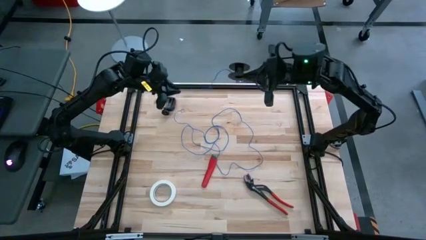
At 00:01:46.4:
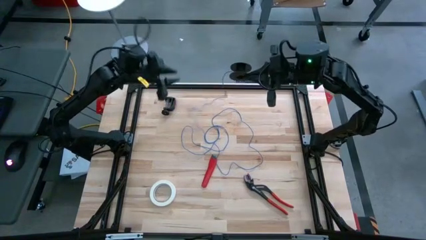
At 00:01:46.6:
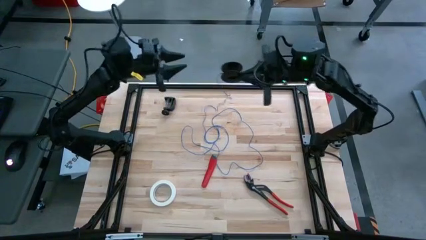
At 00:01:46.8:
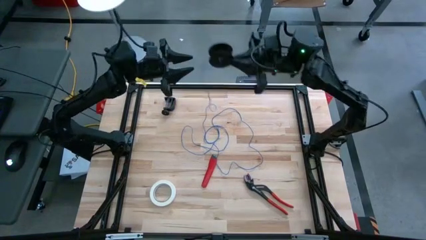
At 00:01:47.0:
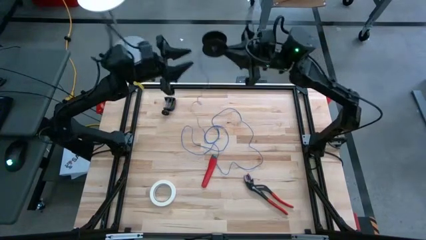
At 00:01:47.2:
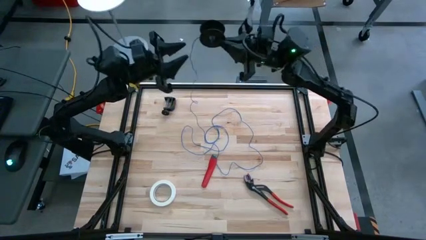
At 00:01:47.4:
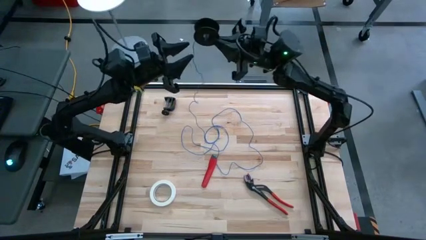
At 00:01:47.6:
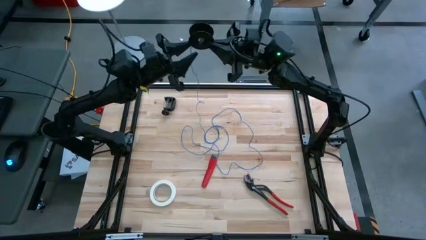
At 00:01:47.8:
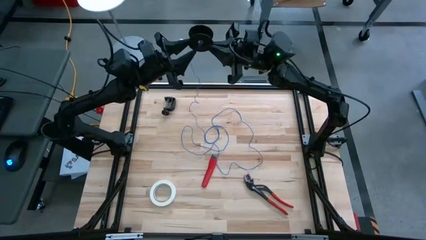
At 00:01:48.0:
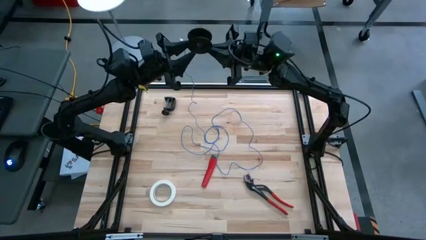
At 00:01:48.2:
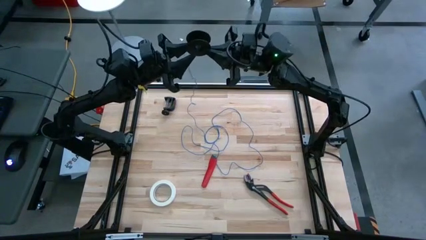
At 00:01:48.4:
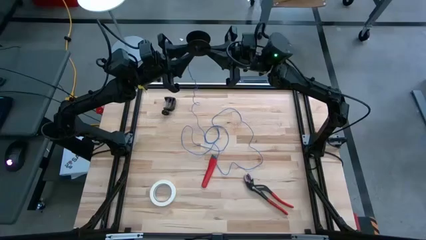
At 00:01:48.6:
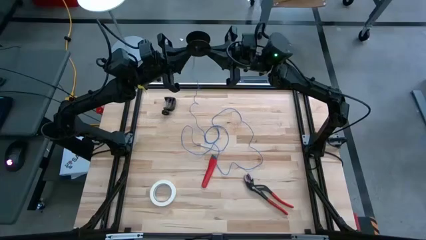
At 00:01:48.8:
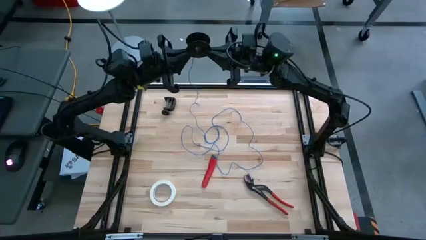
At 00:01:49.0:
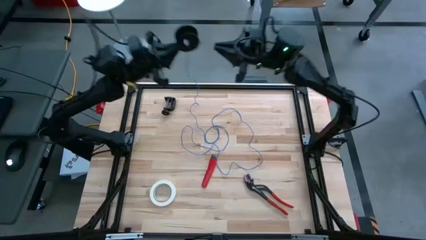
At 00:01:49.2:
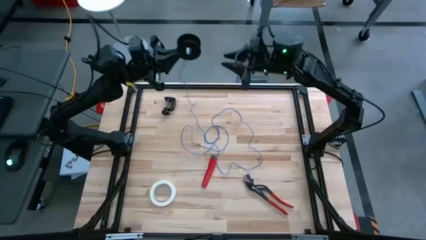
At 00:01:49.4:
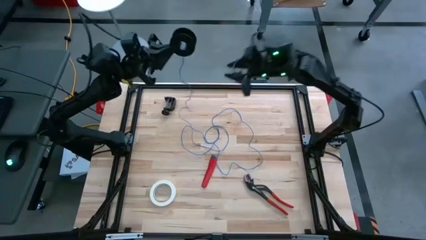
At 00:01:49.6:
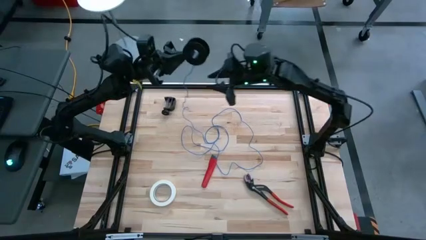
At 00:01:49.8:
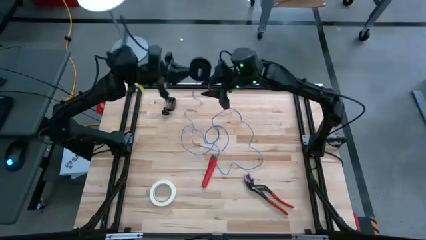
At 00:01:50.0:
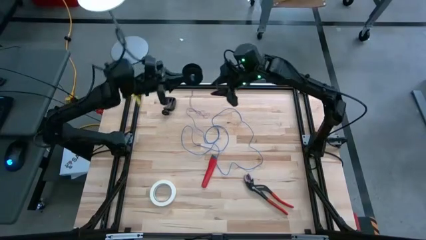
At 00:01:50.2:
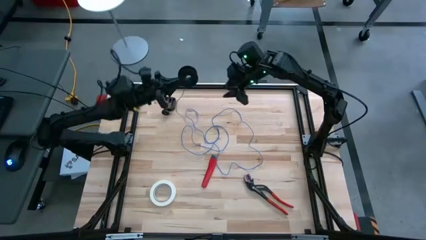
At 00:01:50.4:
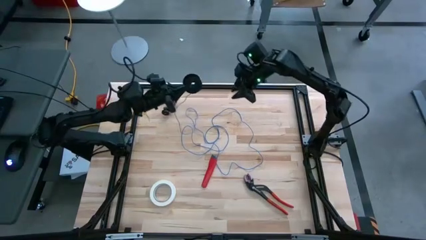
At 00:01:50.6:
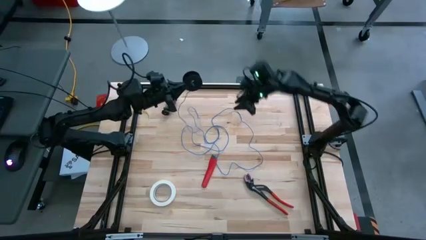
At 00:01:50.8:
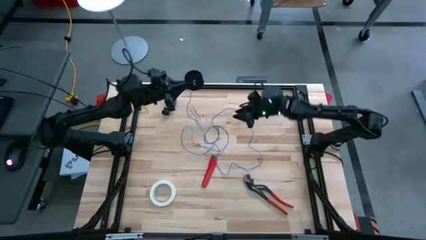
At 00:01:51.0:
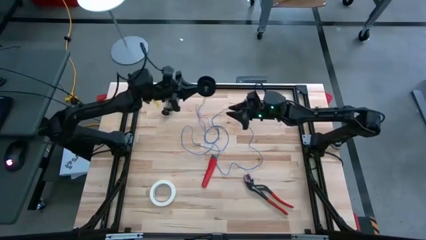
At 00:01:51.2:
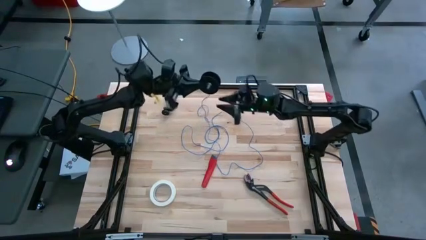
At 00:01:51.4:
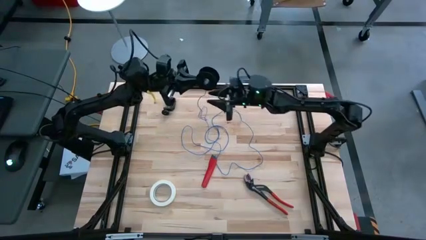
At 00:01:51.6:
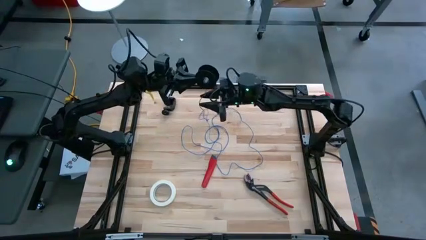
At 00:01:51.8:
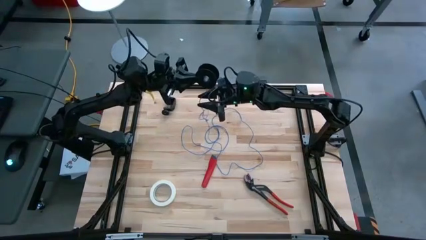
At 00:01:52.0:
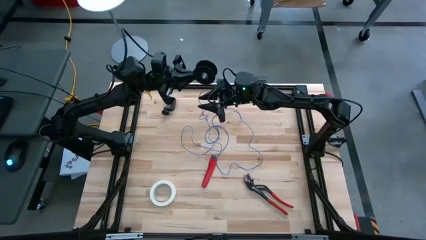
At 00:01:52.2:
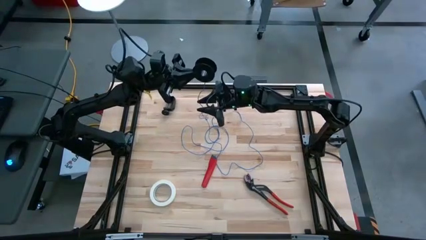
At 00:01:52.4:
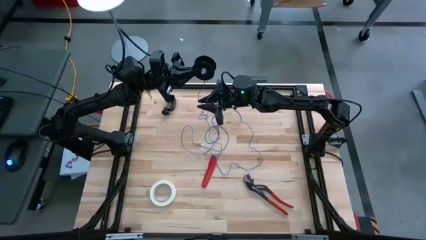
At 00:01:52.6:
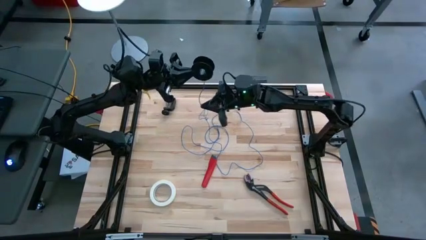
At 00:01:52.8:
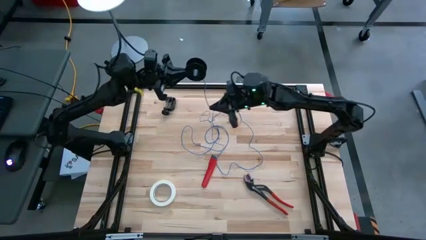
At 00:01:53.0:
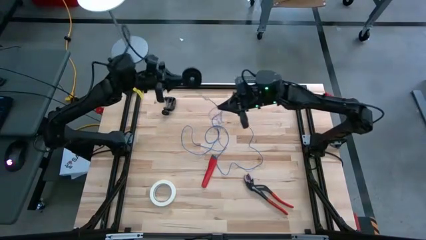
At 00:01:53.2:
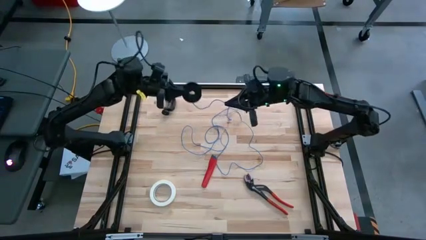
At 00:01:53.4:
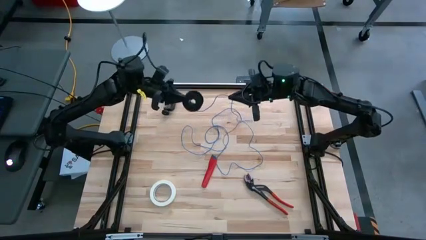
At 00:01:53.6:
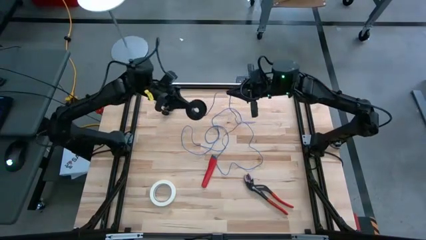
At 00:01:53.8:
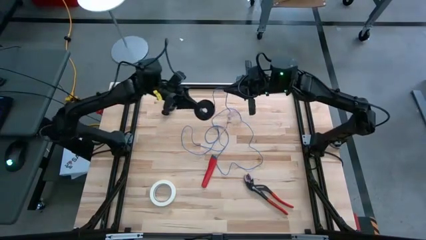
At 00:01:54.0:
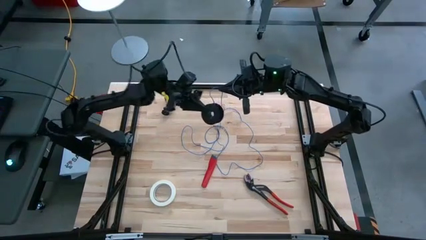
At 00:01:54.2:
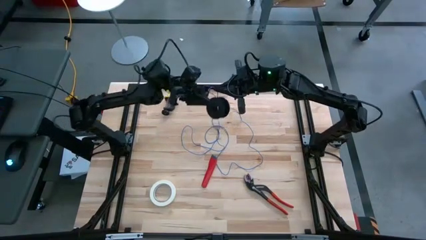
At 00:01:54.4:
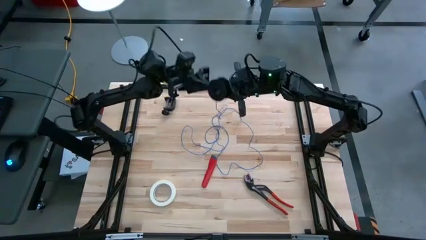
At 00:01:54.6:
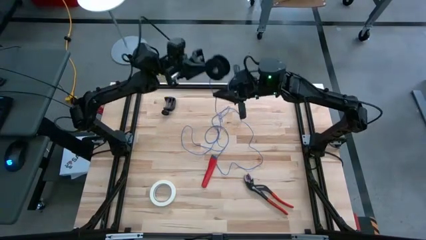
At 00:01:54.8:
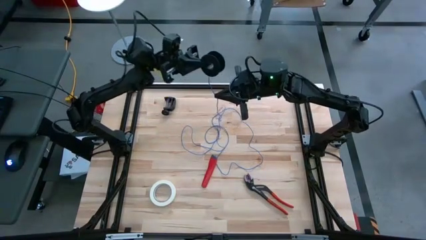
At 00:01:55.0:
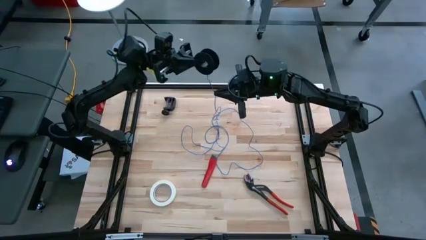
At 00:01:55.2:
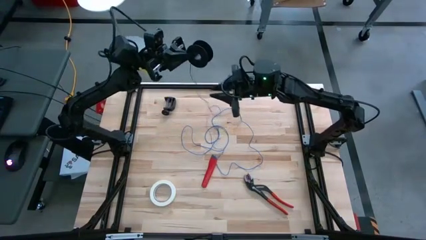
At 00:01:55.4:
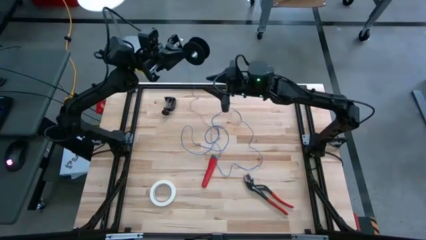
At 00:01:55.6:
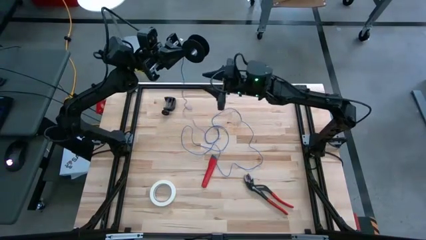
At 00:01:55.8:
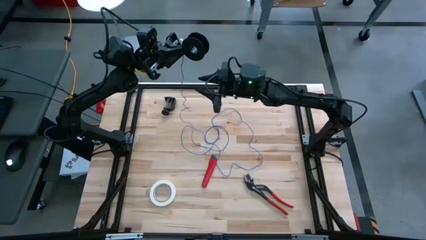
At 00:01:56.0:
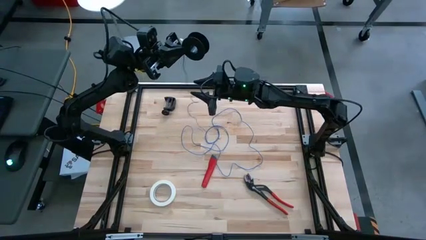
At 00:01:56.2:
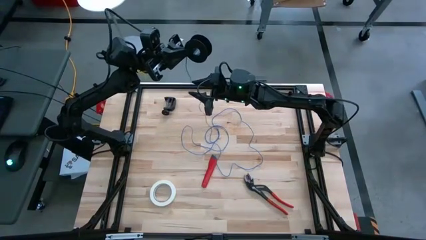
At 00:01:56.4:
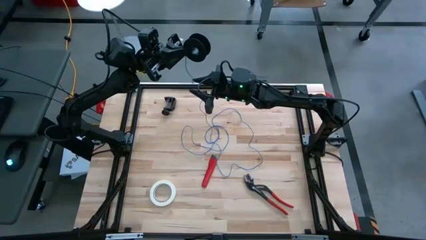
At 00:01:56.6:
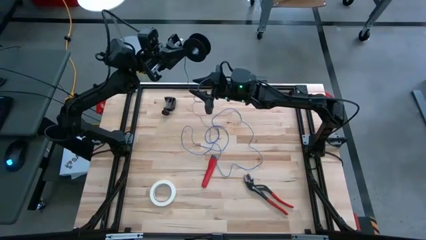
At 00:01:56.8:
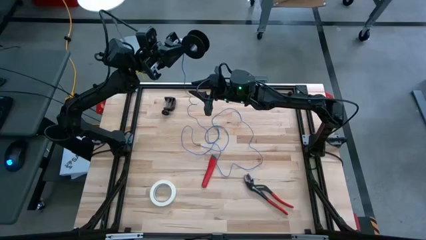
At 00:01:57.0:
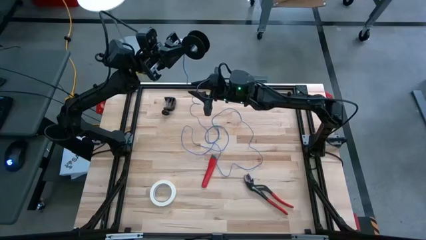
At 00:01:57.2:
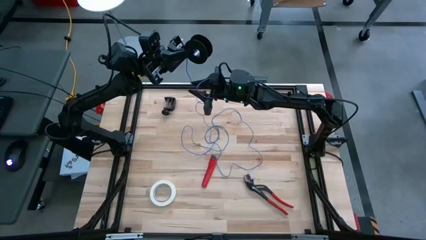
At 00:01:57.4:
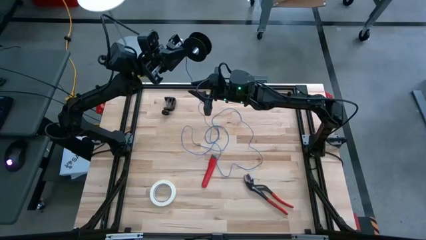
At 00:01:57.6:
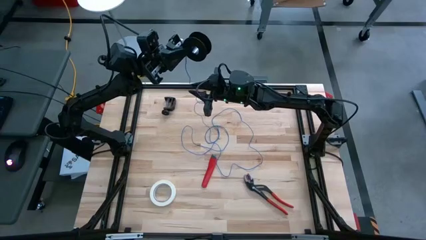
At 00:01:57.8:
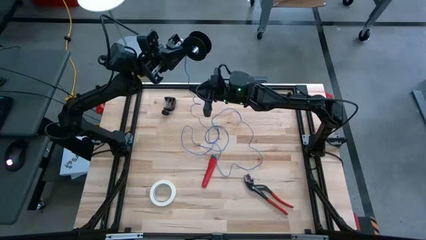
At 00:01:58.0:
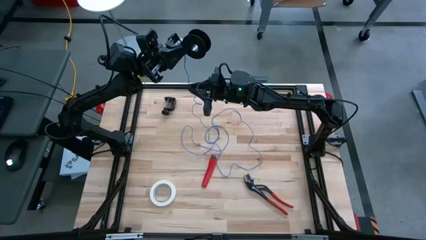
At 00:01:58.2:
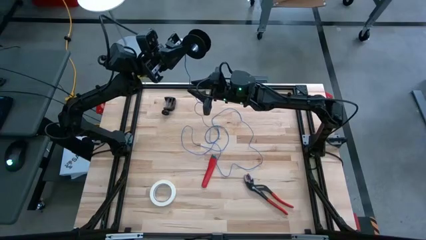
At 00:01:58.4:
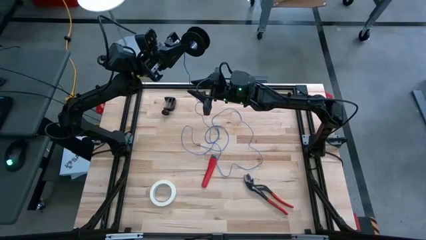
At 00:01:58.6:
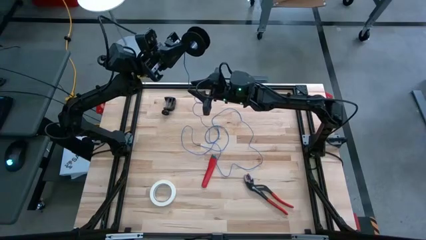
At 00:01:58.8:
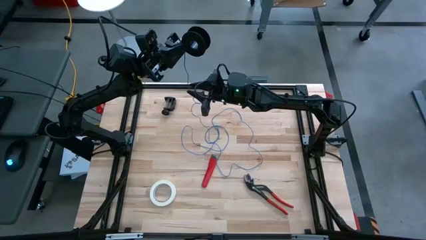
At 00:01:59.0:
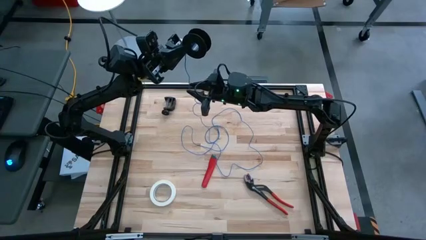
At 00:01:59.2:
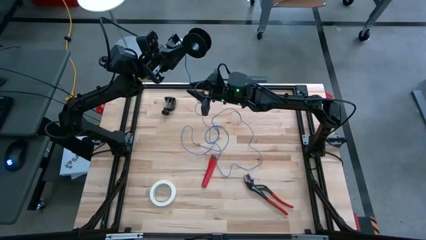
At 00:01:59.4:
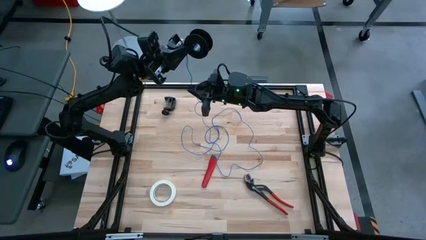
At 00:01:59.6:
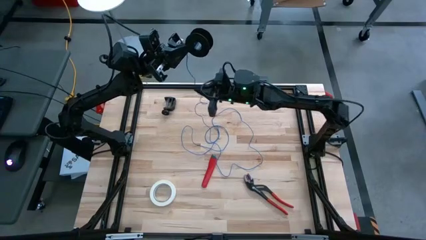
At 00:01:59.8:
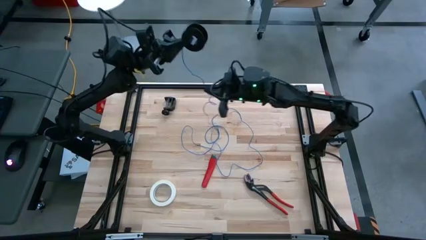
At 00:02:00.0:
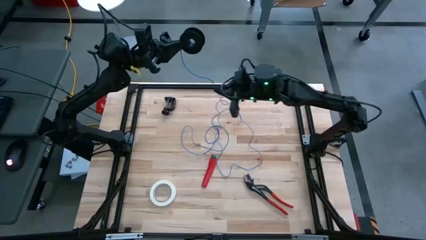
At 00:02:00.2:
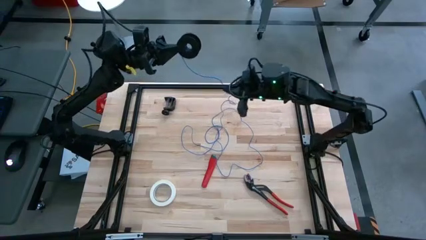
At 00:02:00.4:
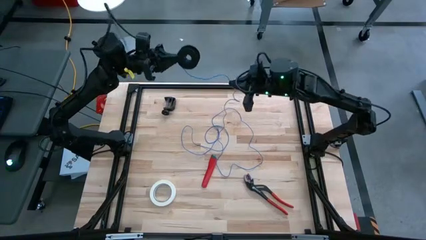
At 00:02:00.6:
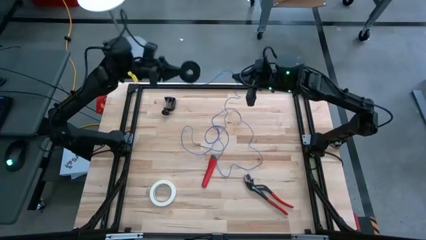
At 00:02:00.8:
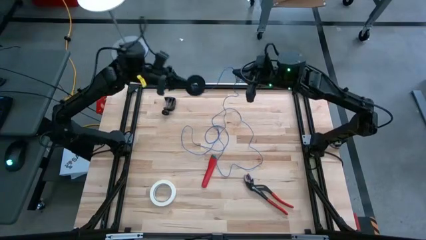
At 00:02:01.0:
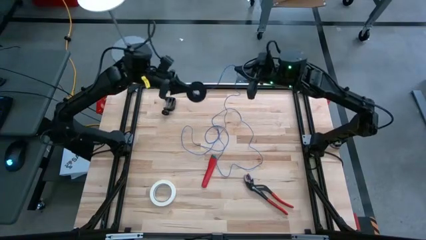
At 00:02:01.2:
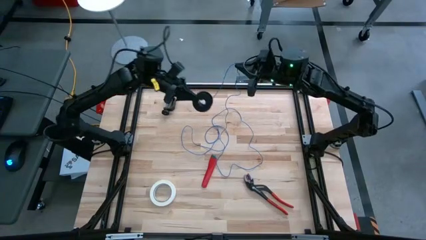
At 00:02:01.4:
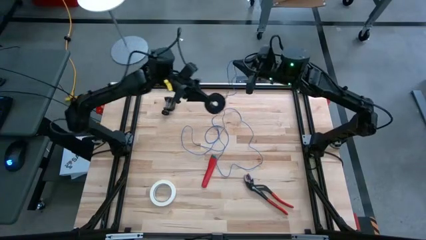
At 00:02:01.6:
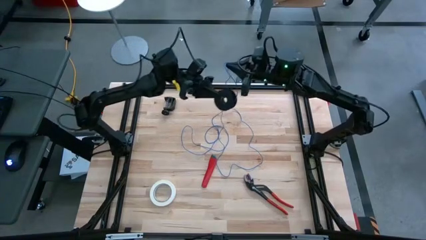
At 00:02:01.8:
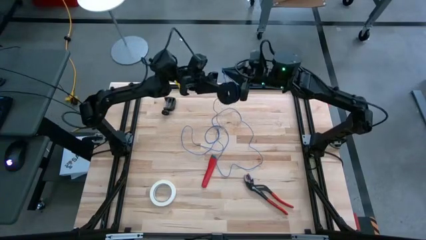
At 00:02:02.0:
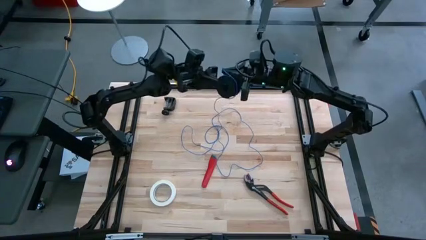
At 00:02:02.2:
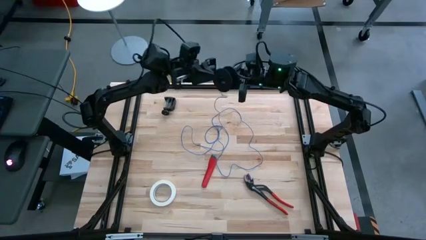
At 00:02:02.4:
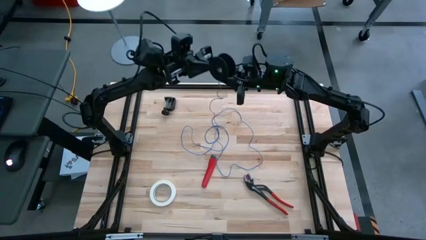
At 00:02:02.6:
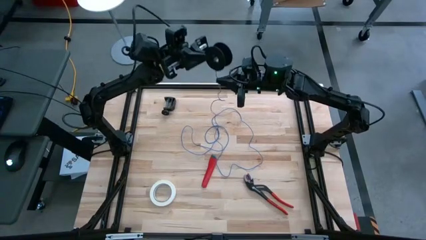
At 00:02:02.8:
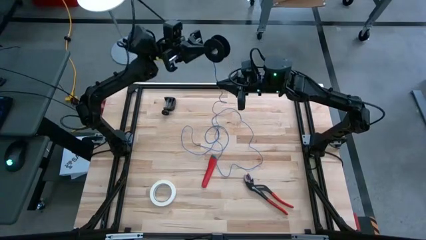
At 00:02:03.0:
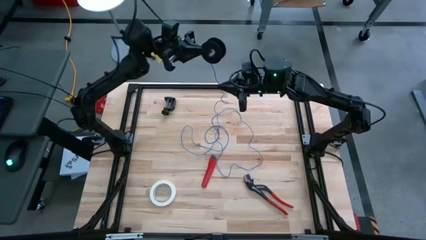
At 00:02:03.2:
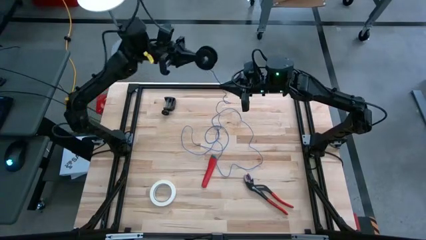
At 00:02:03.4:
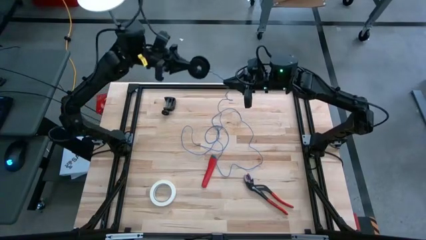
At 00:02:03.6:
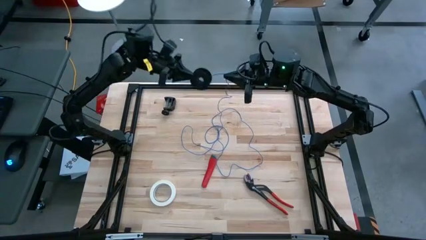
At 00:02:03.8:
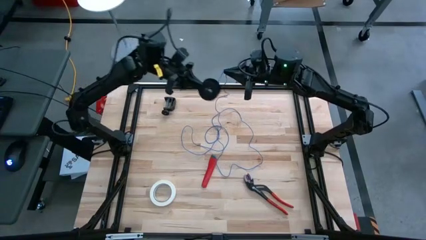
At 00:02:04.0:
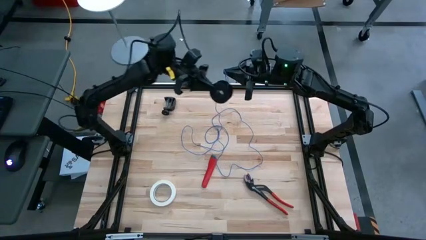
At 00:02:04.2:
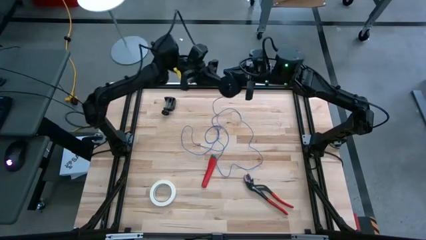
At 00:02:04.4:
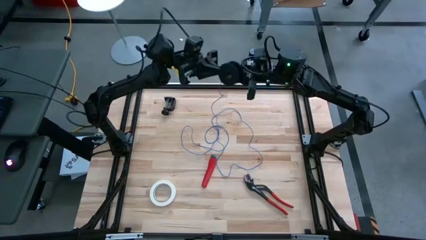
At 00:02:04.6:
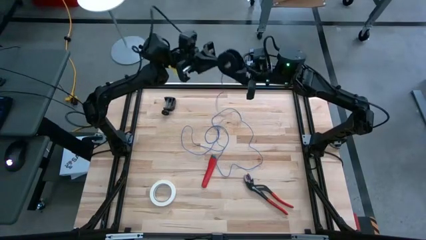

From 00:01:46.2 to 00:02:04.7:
Task: Coil cords
Coil the blue wire cable onto the black spool
